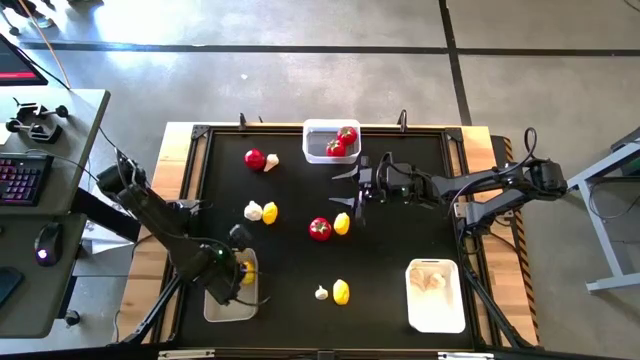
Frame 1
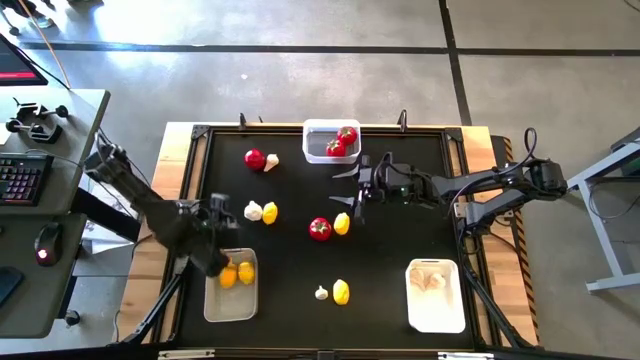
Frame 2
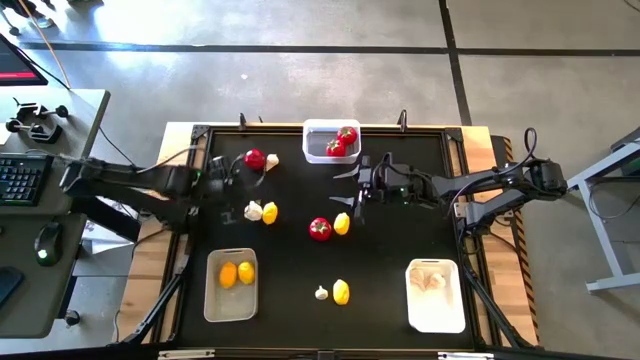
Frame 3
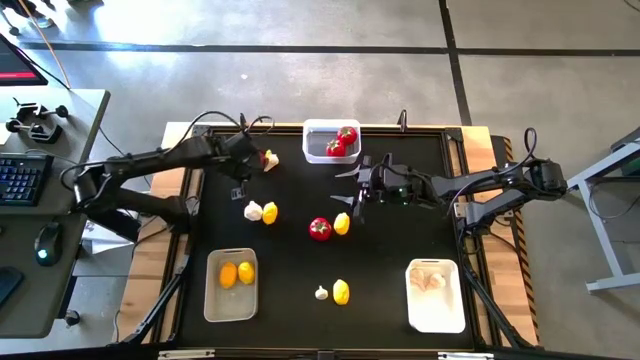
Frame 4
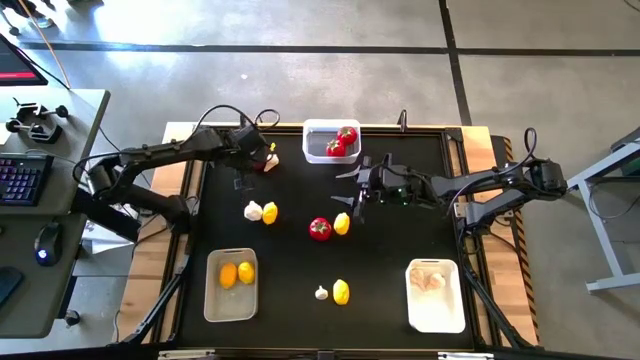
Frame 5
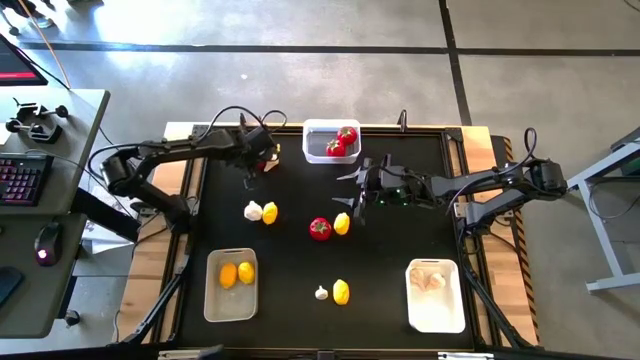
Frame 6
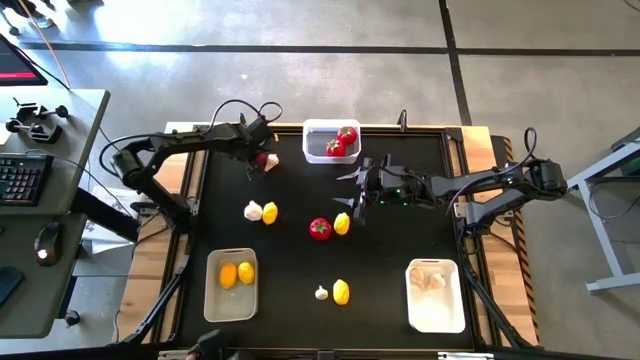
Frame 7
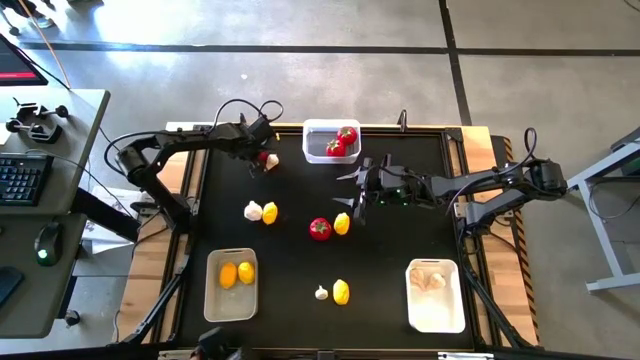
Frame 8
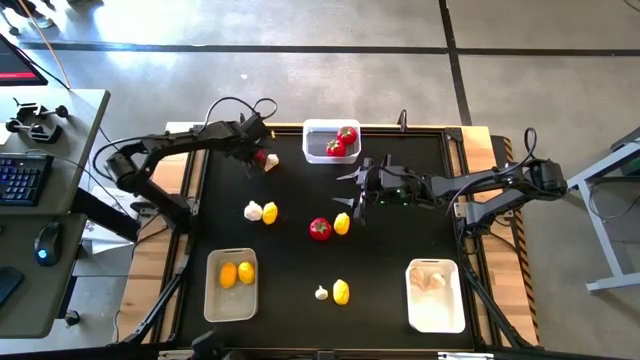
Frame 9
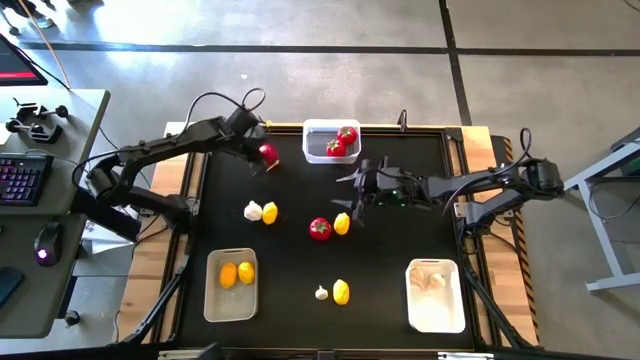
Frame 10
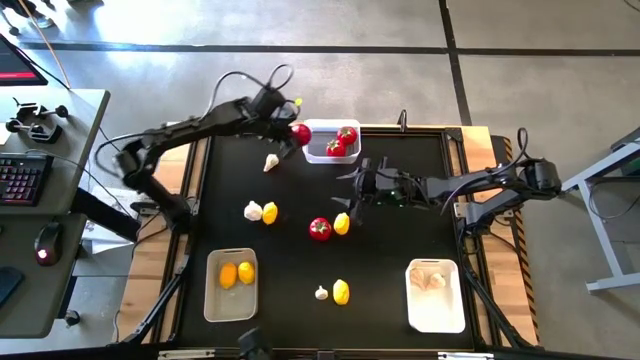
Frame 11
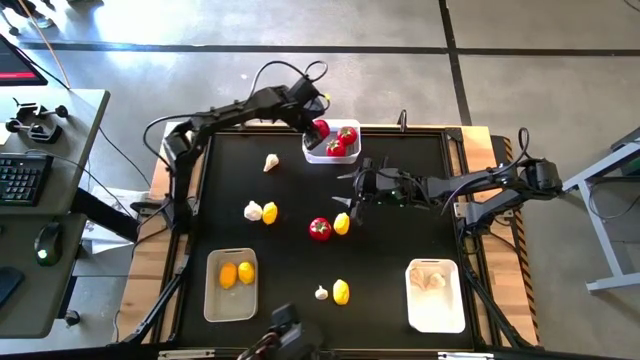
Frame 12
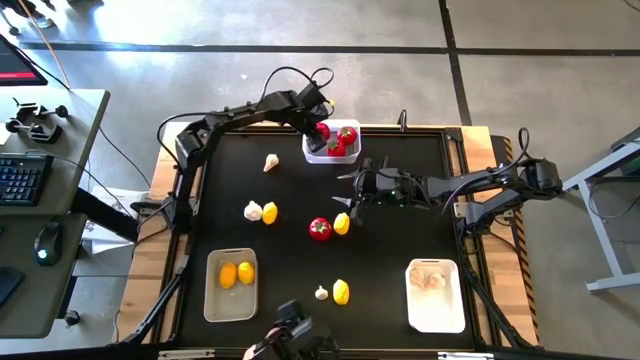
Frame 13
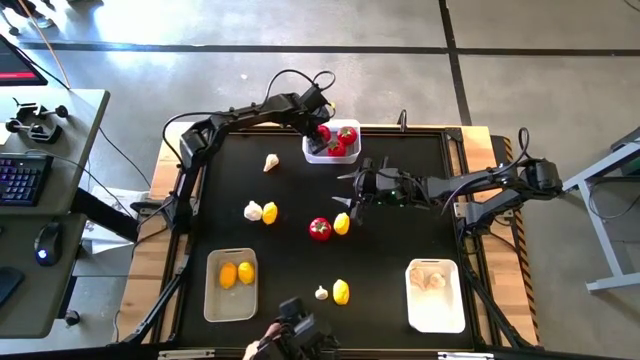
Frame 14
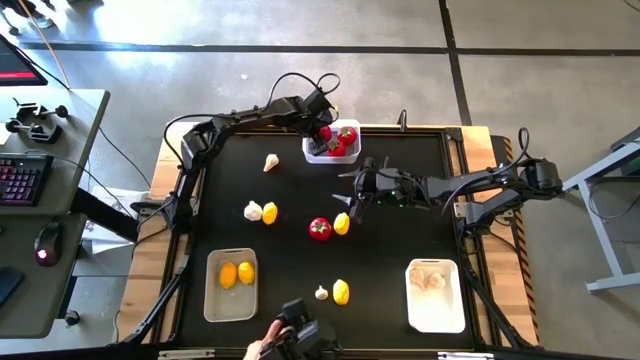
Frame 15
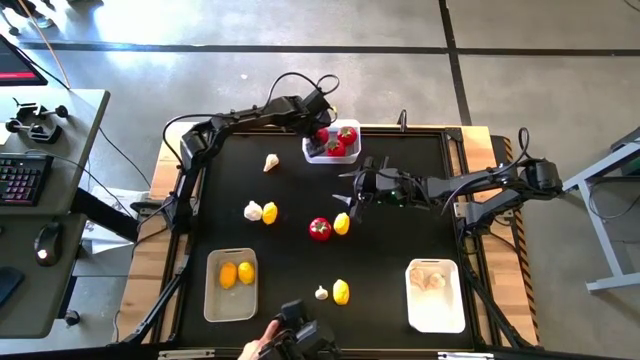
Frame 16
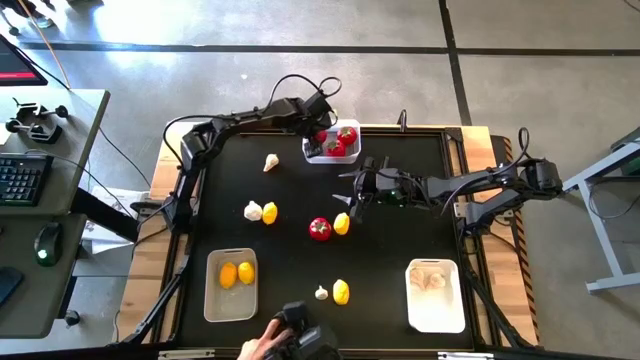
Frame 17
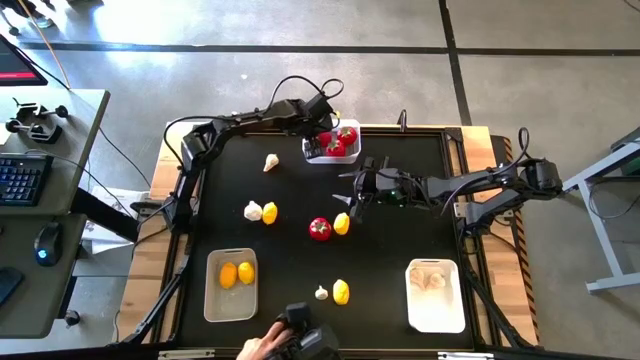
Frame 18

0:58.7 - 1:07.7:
Task: Sort produce into baskets
Put the red tomato into the transparent bin

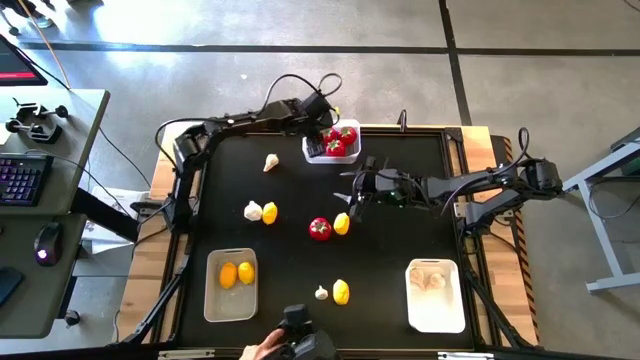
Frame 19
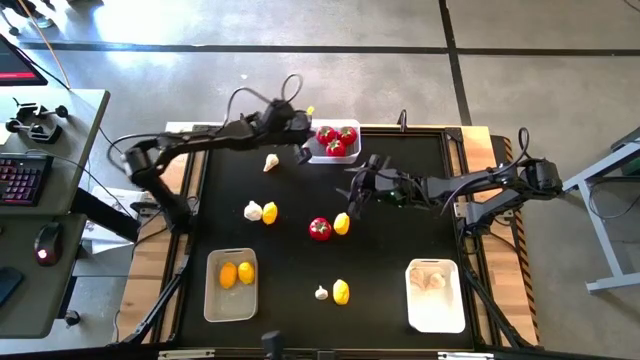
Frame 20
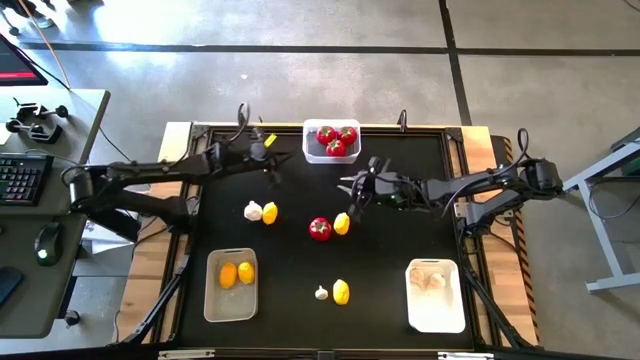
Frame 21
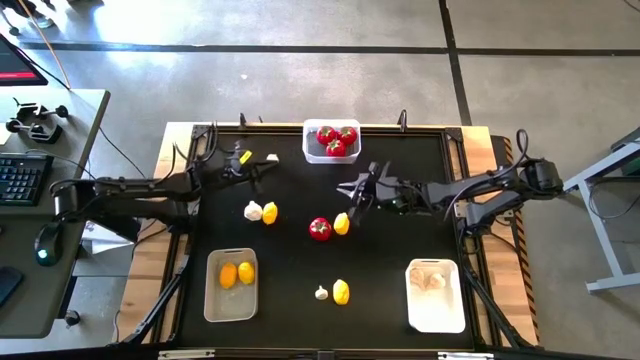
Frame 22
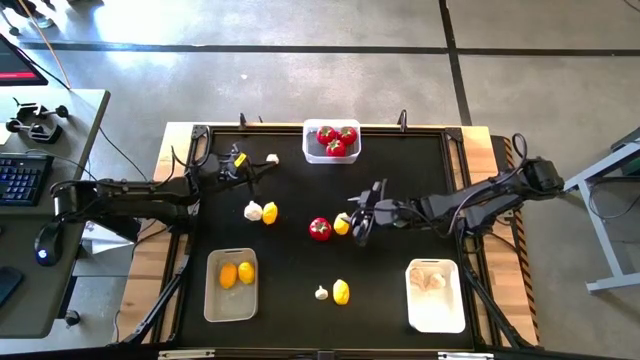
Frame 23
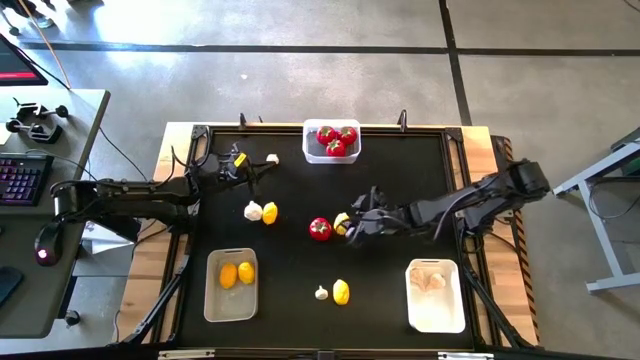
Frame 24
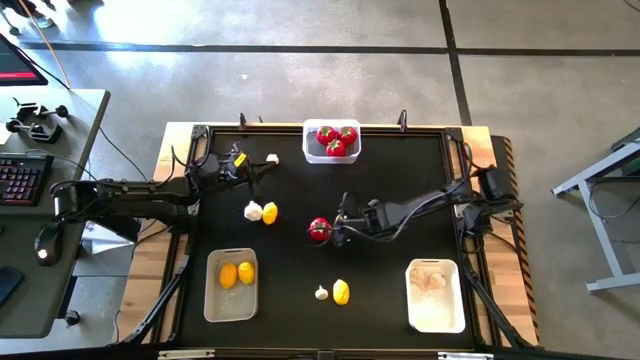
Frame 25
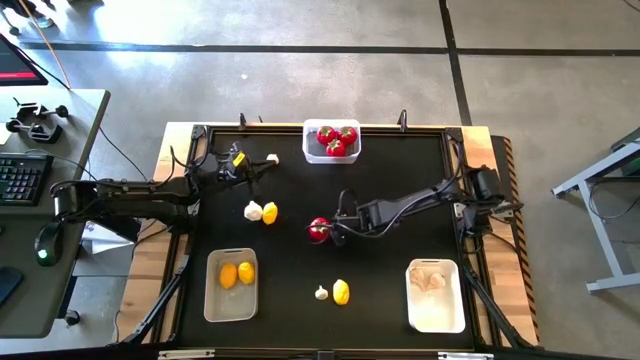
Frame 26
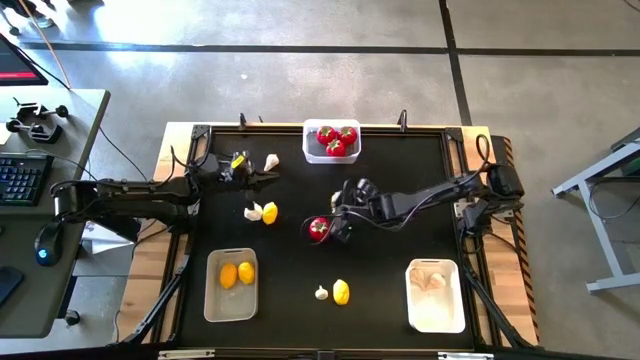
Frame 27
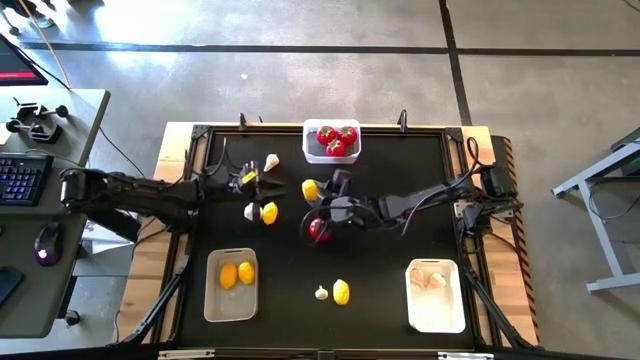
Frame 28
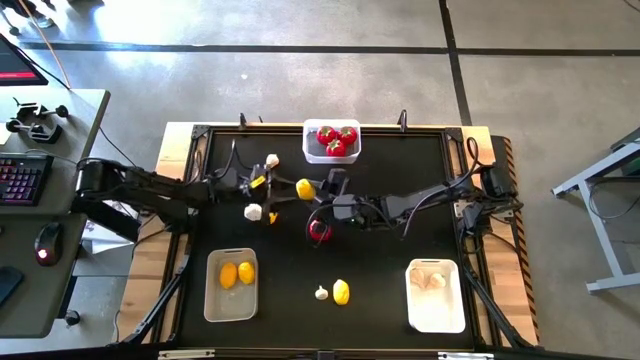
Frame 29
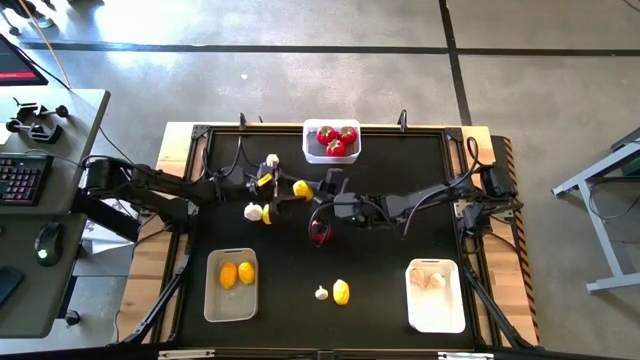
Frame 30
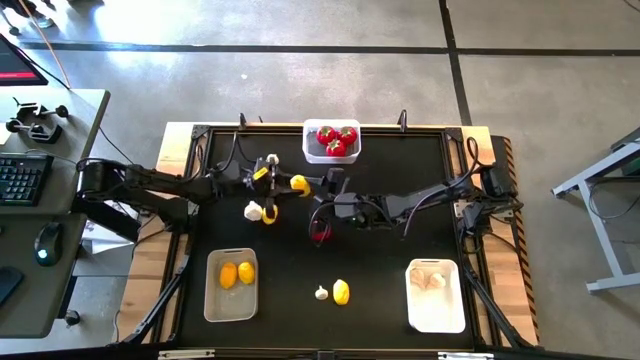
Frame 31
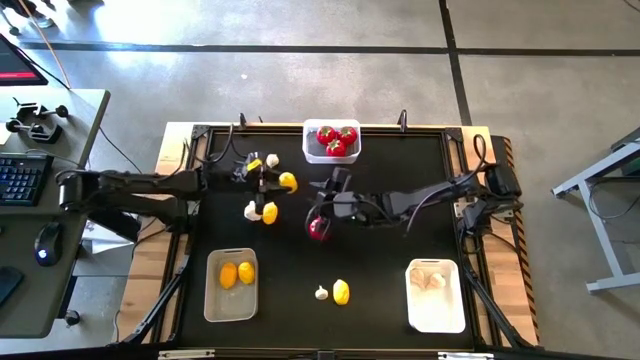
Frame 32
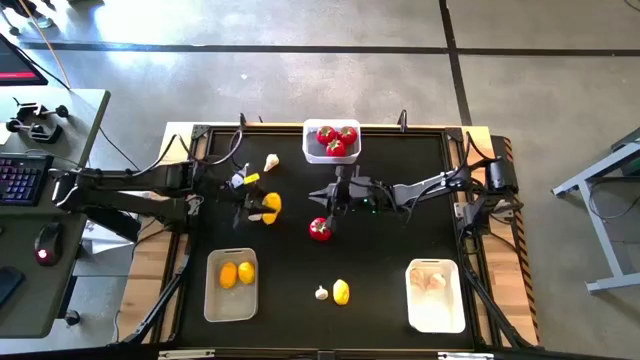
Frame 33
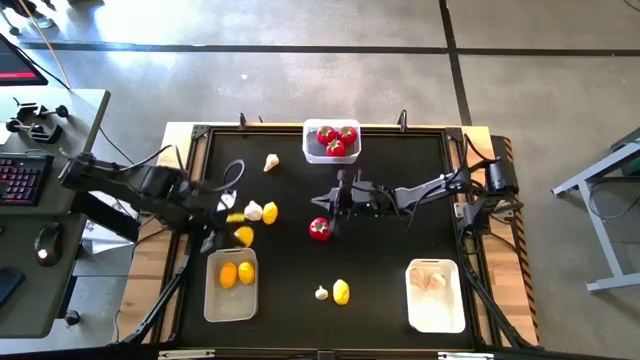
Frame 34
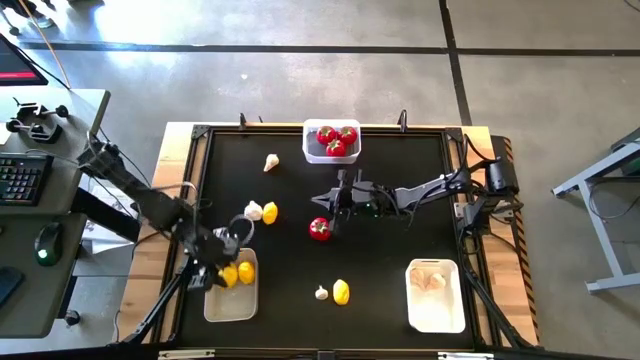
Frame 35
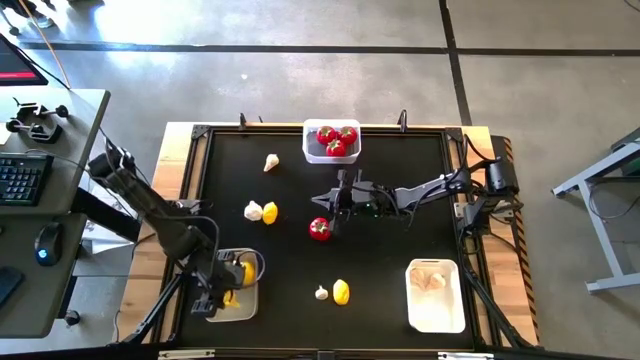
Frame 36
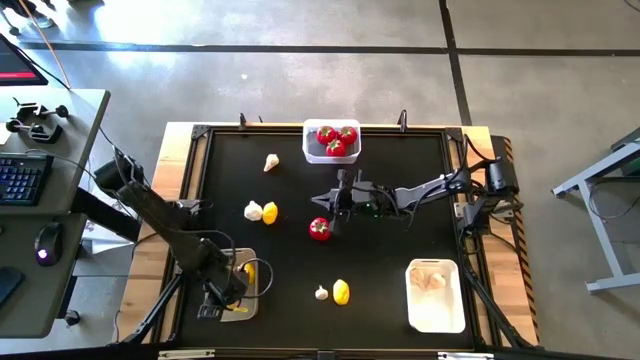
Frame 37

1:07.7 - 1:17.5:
Put the yellow lemon into the gray bin

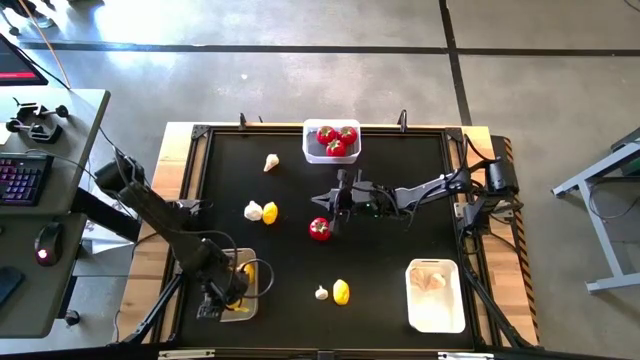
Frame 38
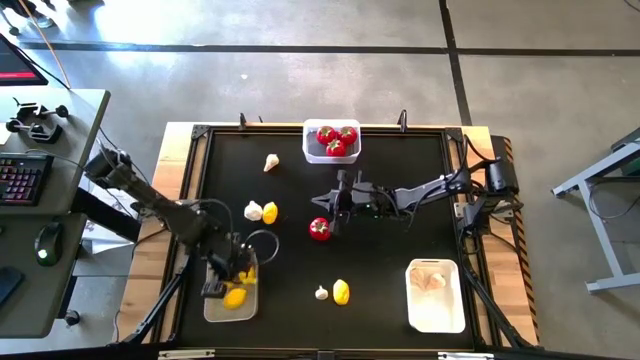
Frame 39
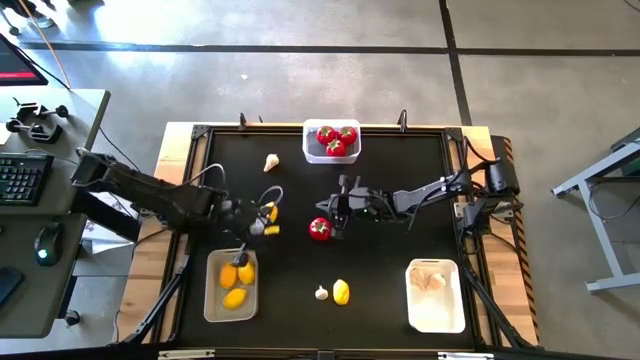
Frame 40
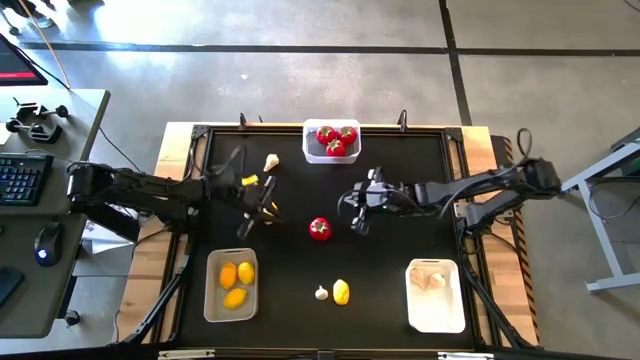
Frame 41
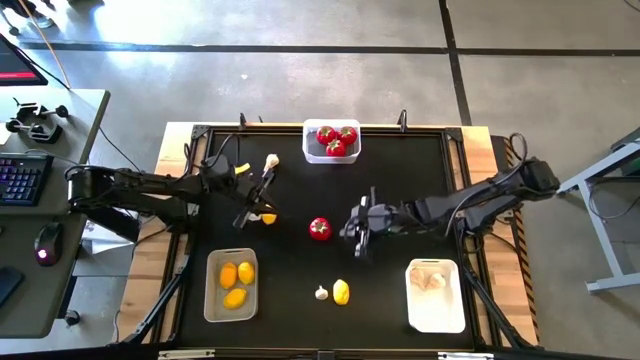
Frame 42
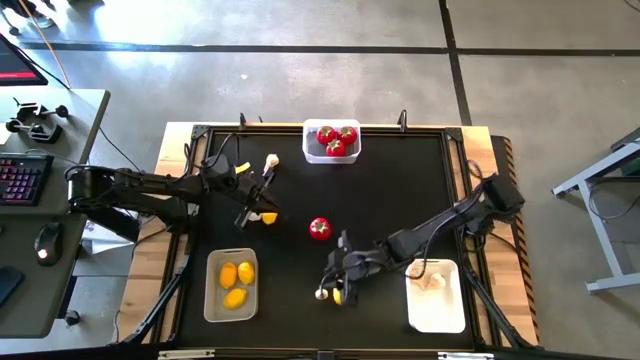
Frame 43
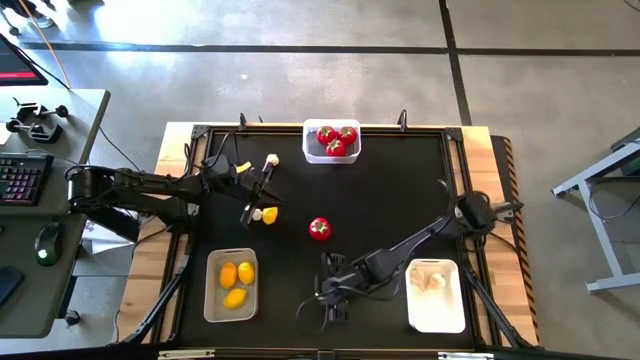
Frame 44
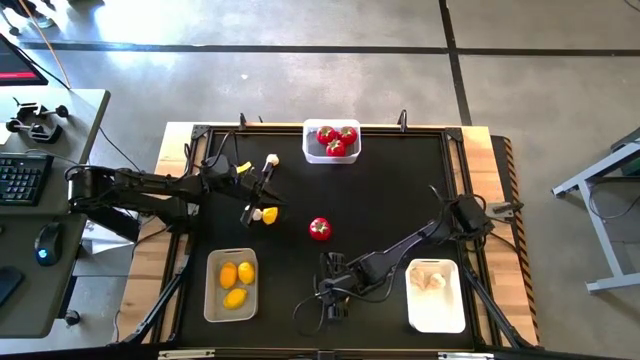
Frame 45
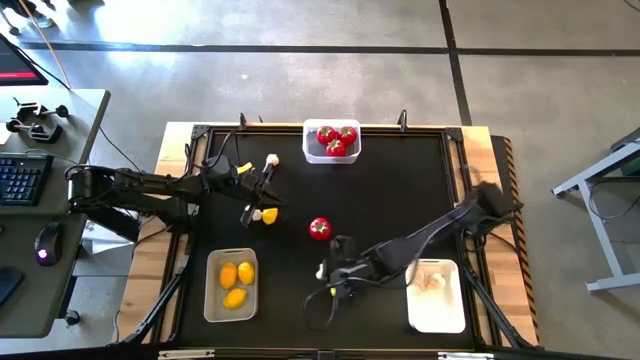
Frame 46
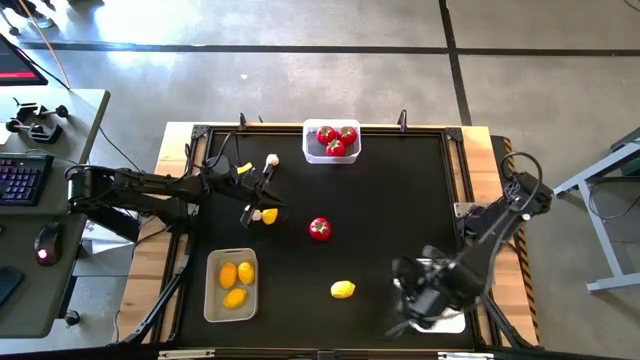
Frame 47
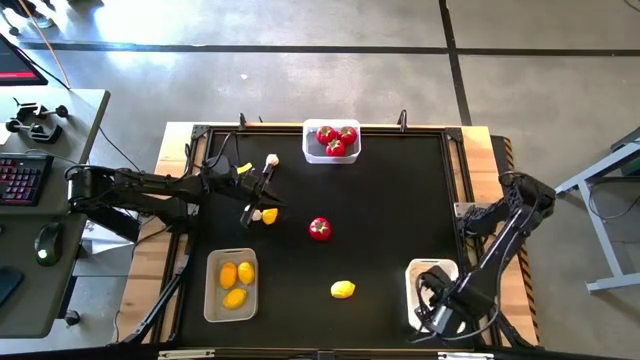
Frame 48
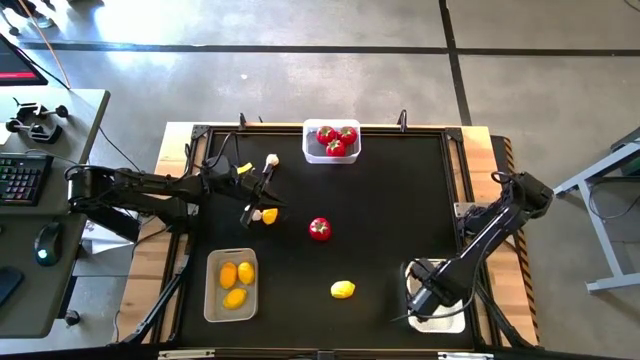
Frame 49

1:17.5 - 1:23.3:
Put the white garlic into the white bin
